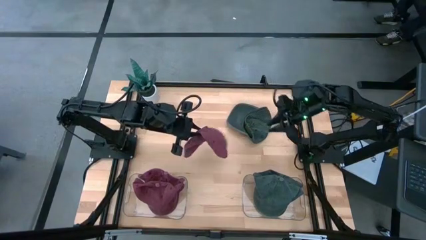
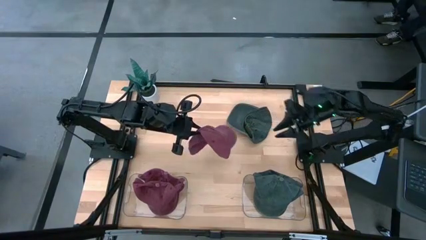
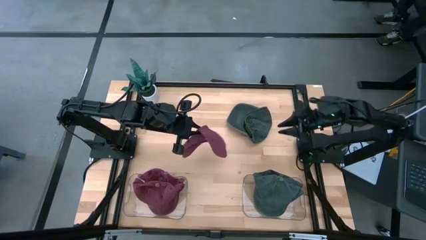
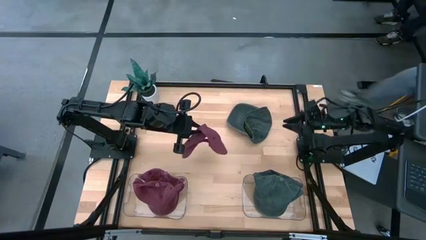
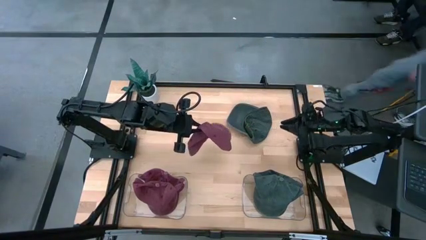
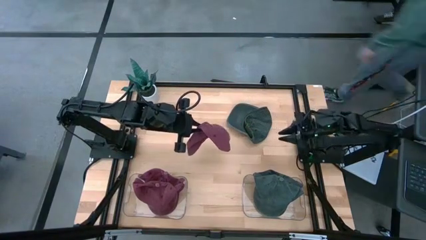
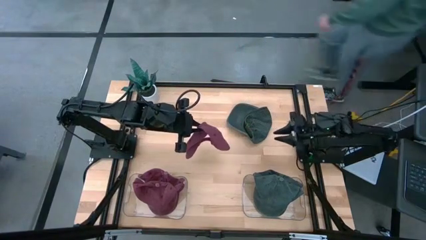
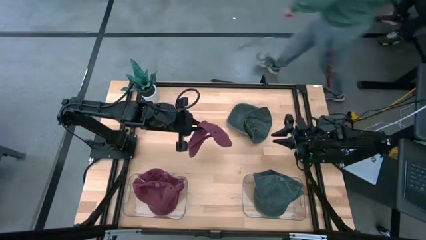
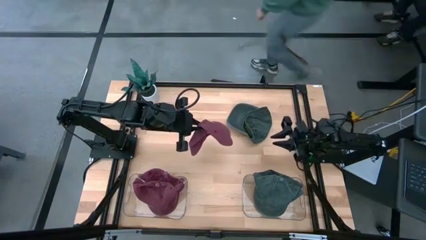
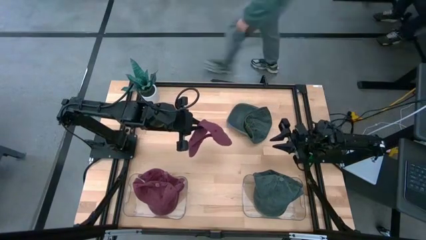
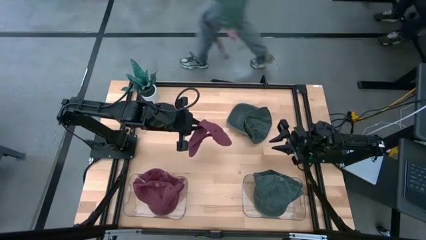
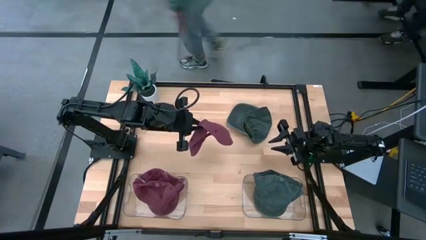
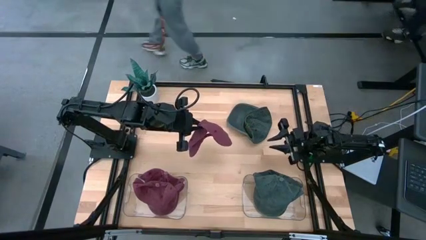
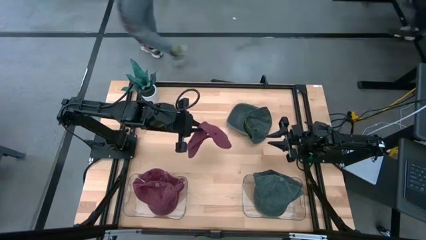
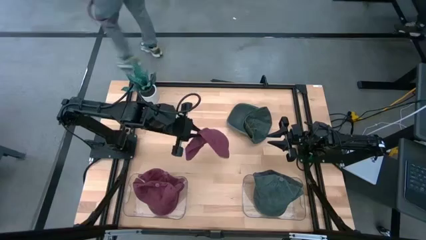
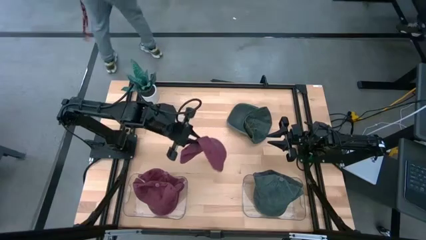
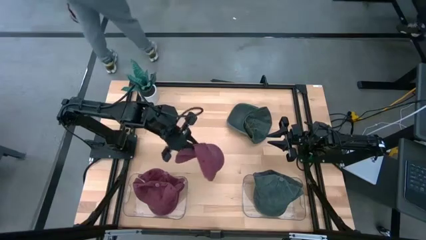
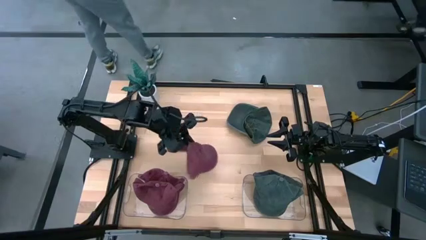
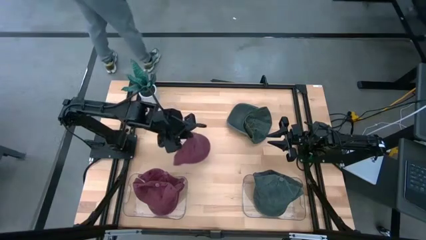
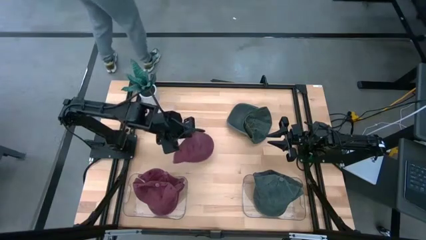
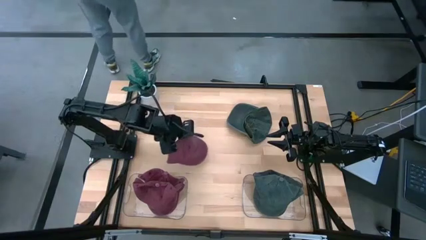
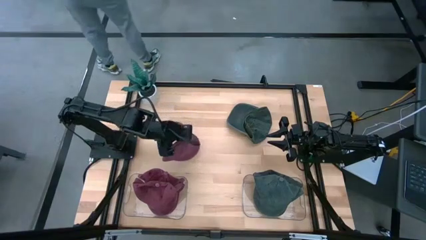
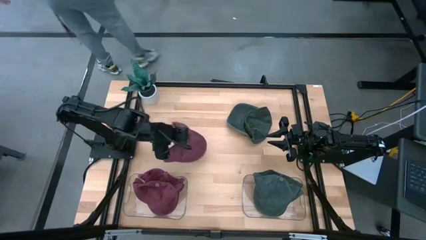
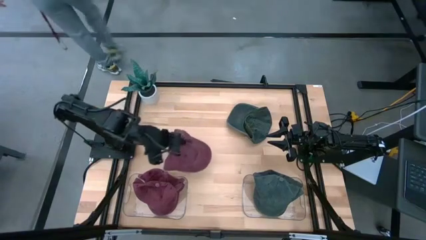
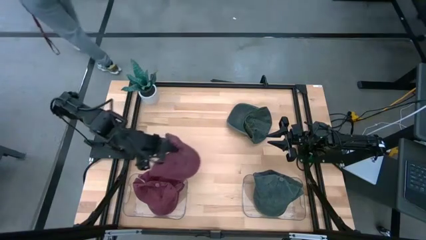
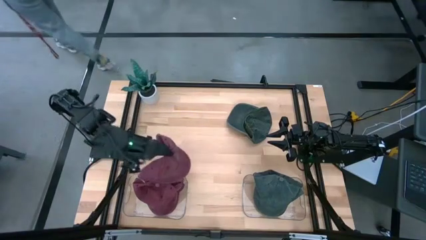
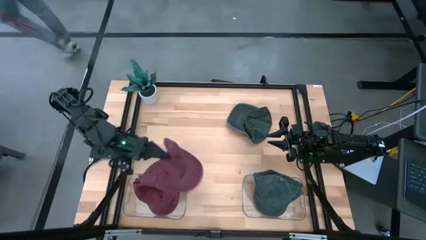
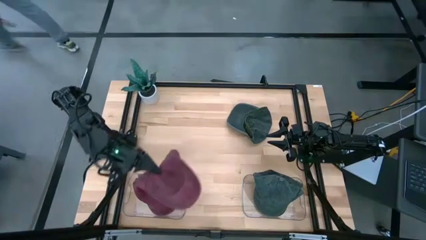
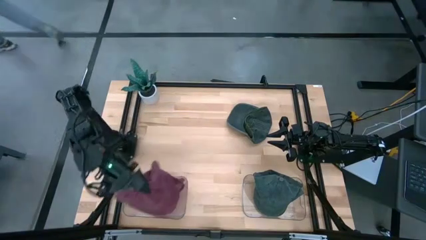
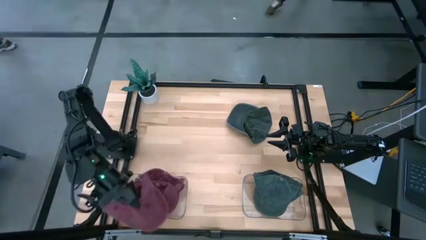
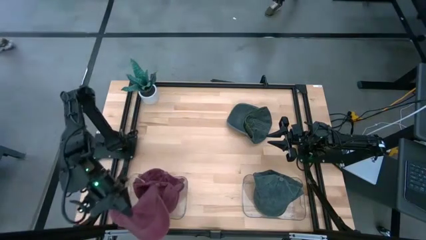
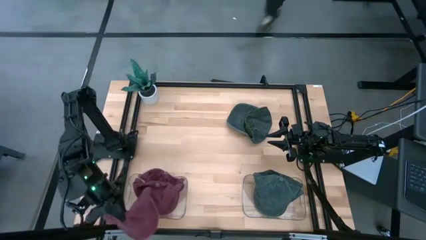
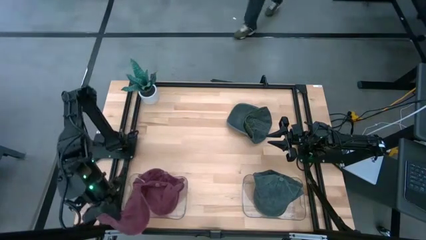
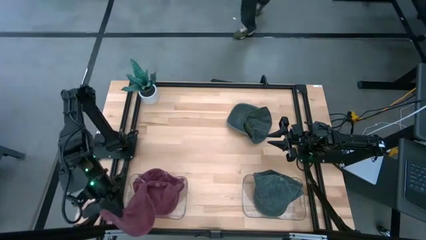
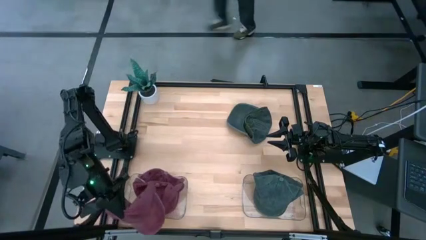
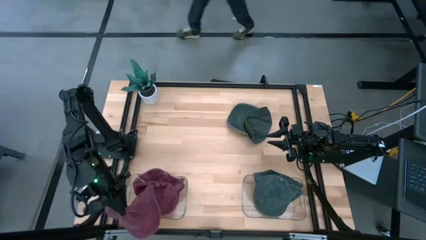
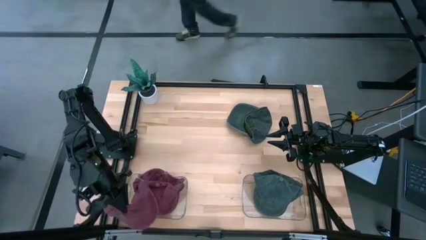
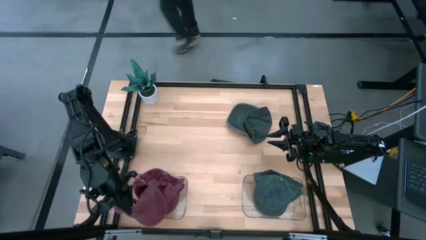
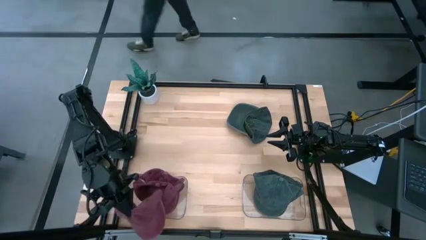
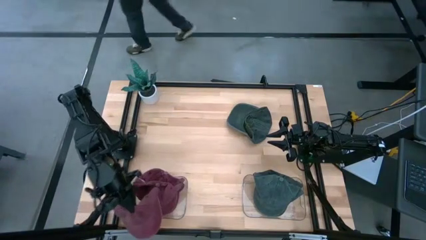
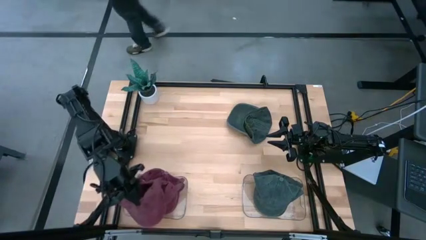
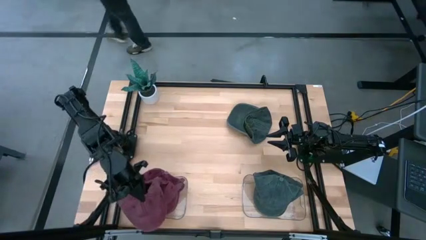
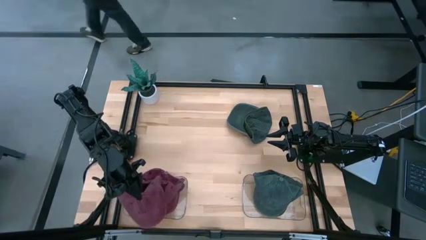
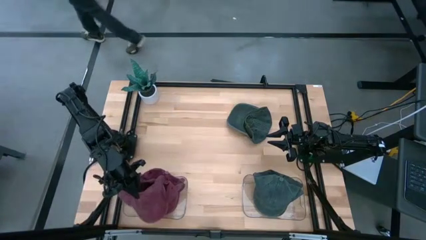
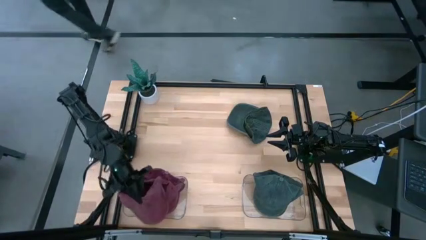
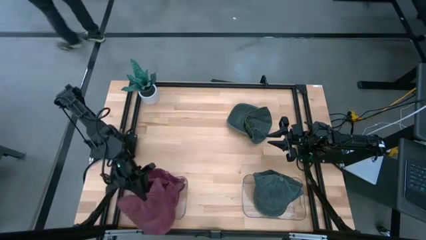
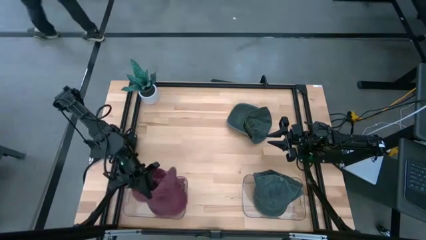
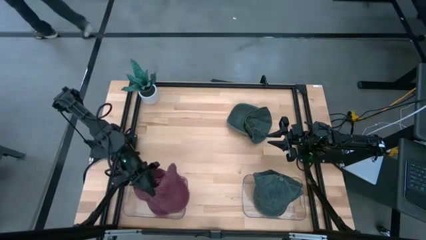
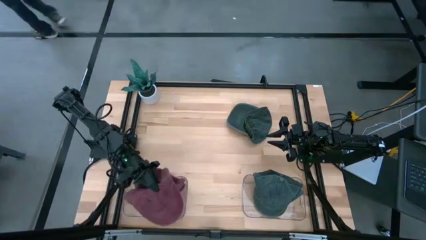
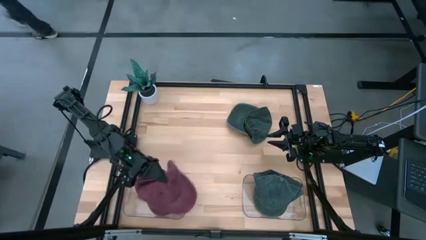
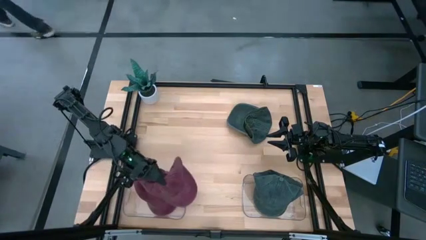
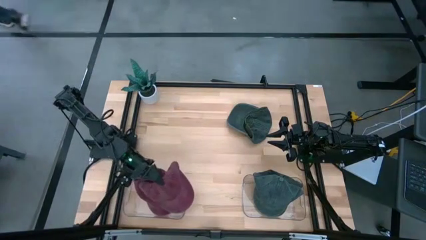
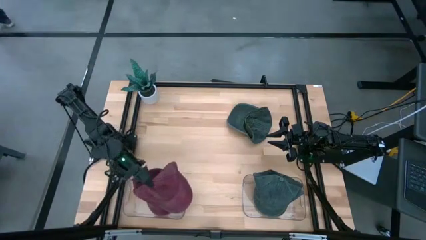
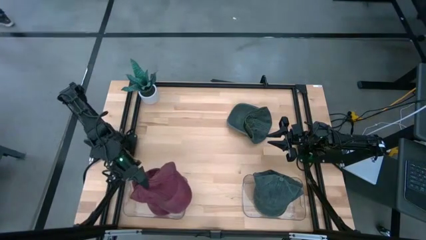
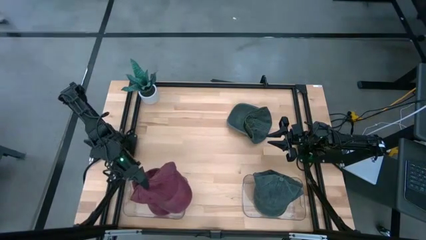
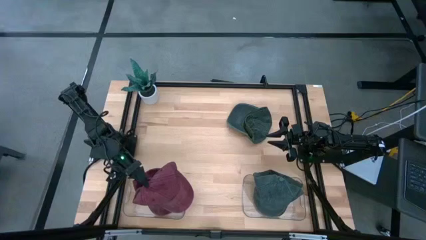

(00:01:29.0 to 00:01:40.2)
Task: Pick & Place hat
Put the red cap into the left transparent bin

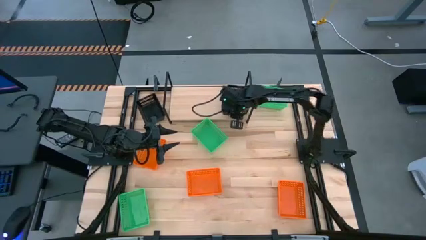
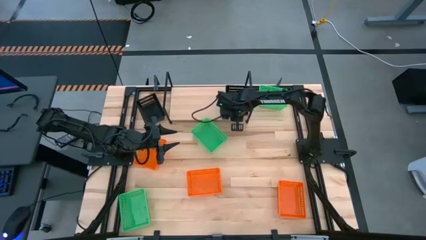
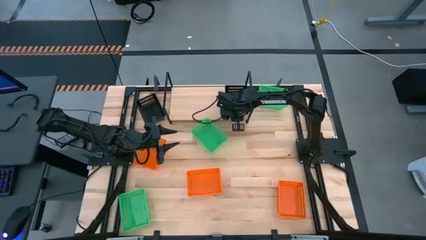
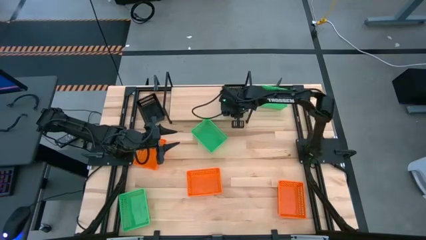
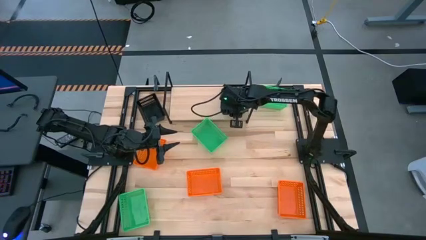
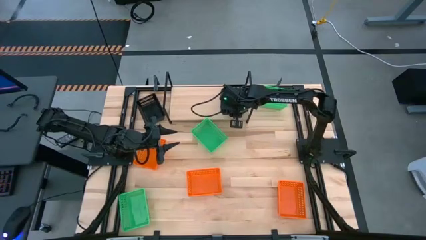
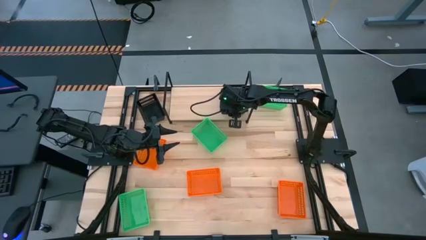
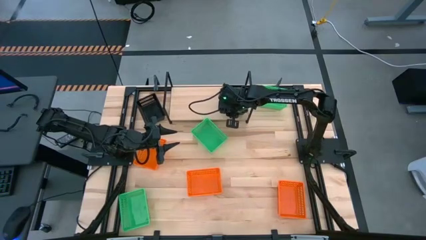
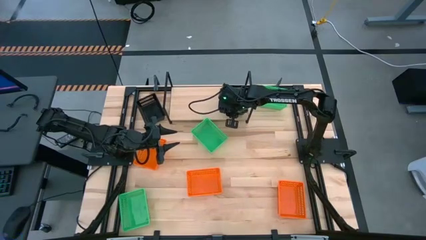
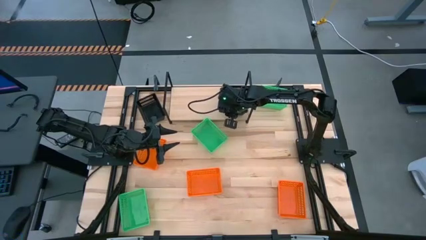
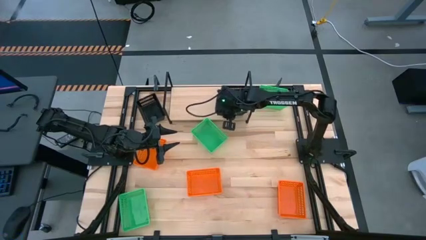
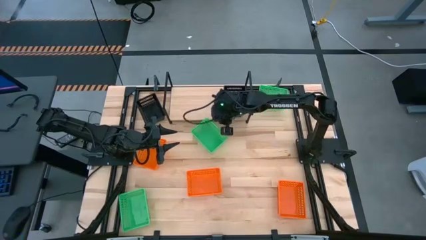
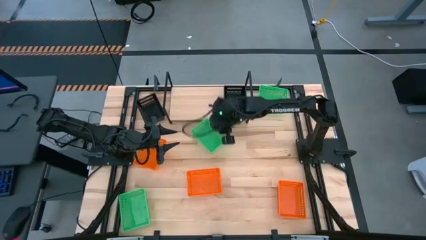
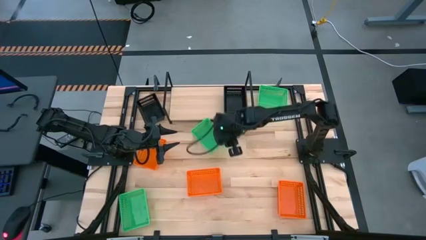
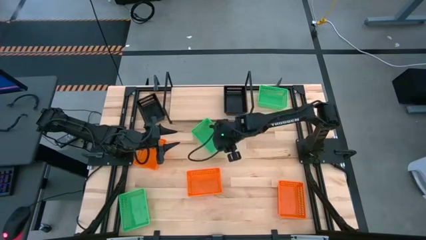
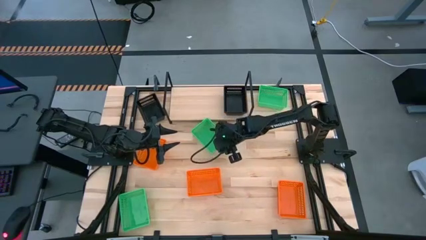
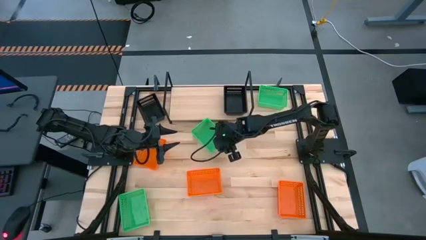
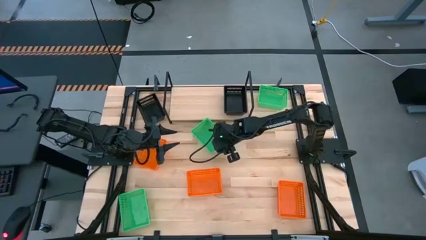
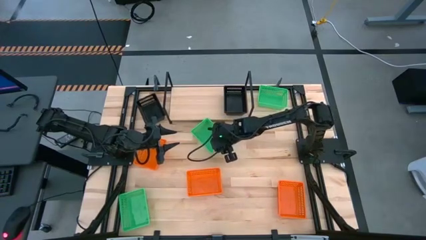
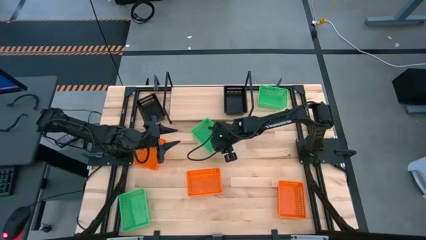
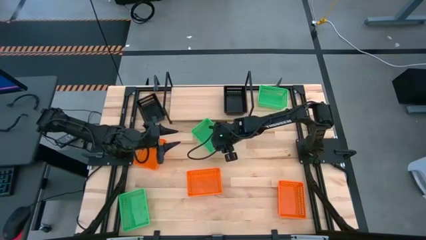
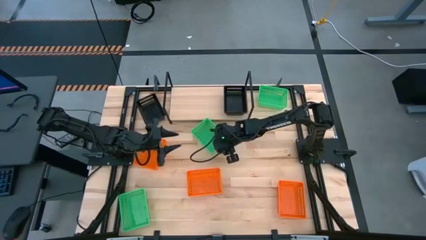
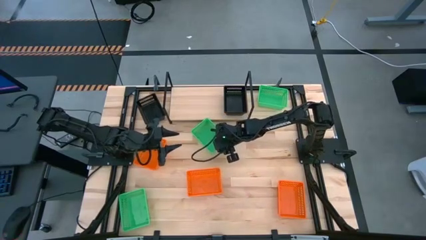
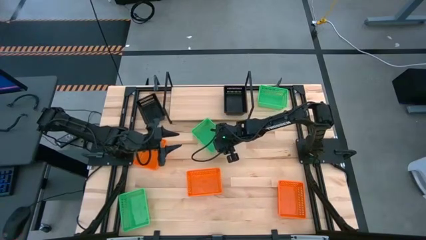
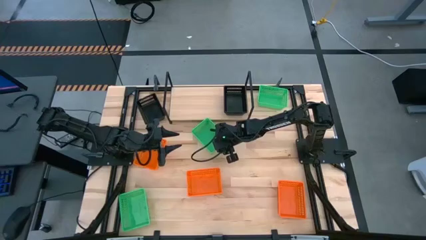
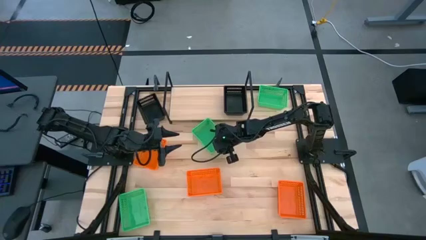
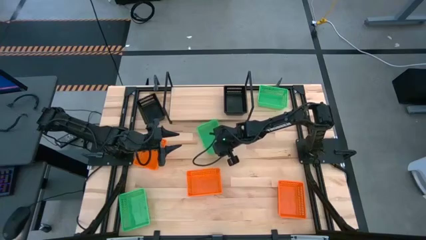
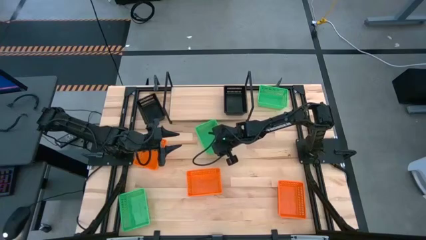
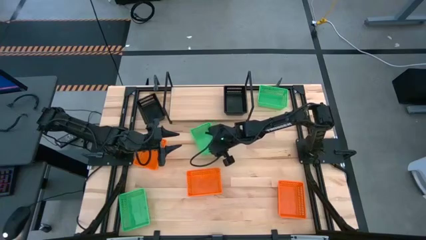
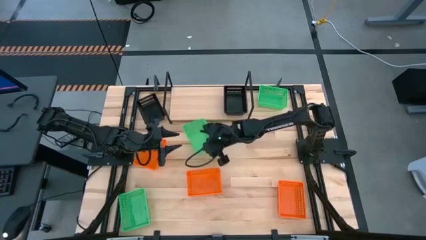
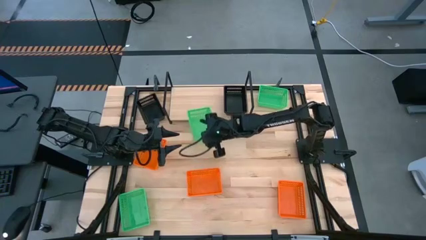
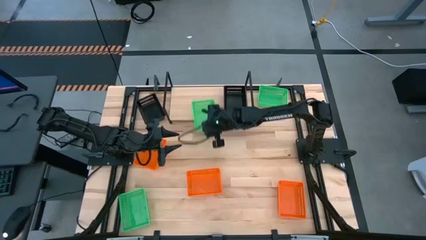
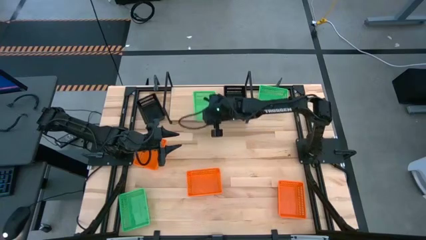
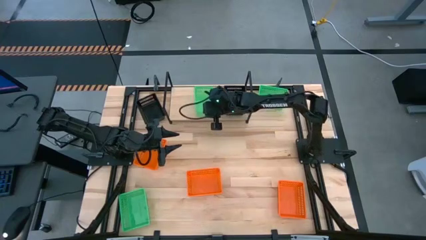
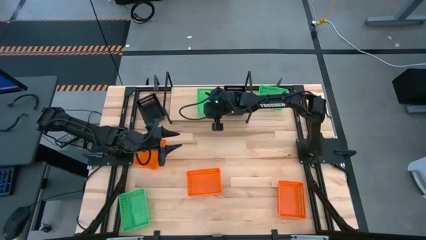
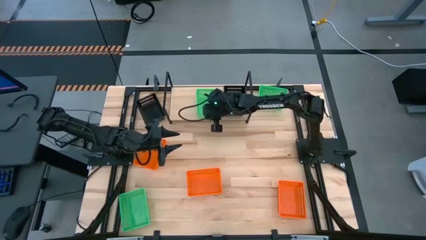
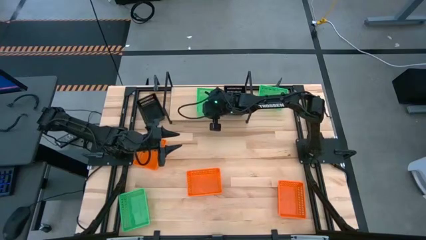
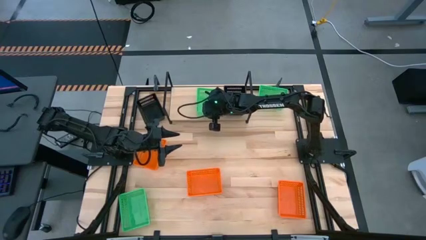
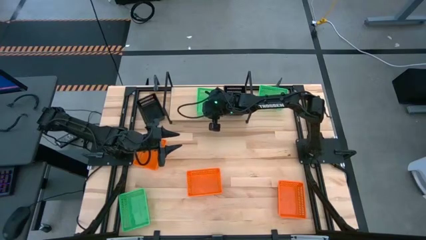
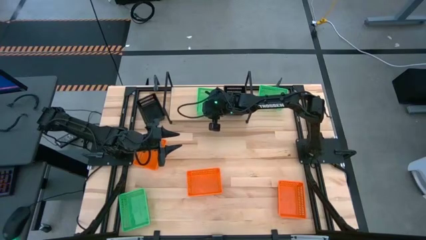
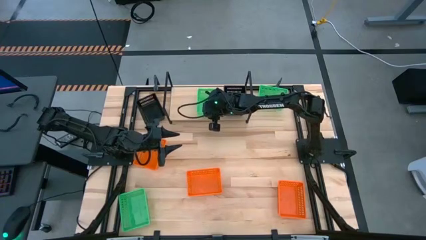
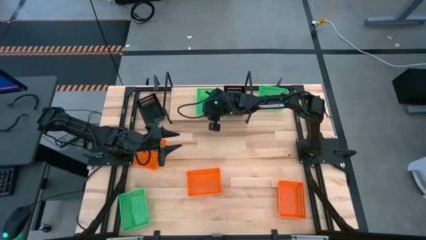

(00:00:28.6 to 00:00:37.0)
Task: Stack baskets on shelf by color
Put the middle green bin on the shelf
